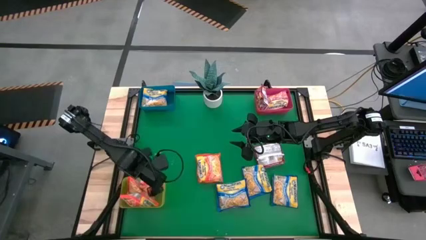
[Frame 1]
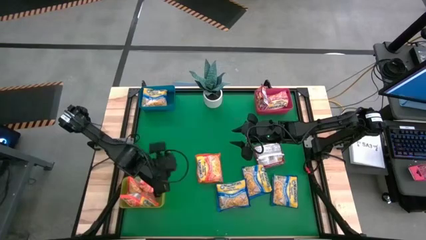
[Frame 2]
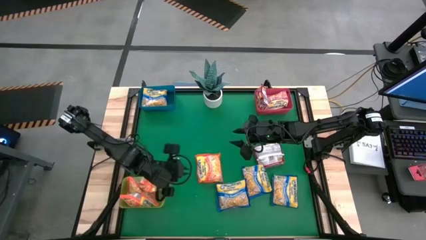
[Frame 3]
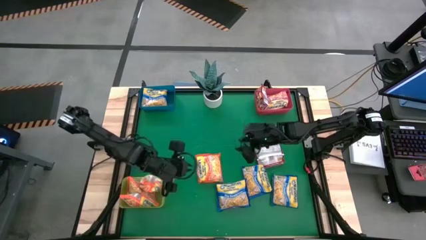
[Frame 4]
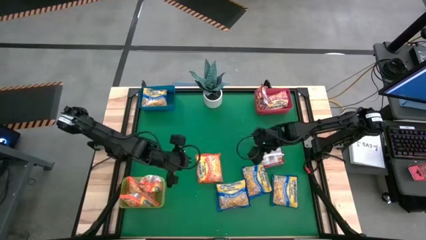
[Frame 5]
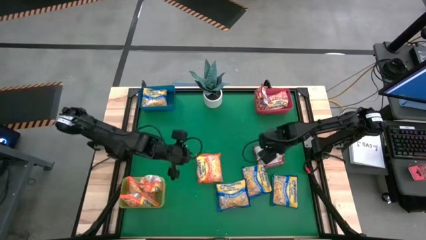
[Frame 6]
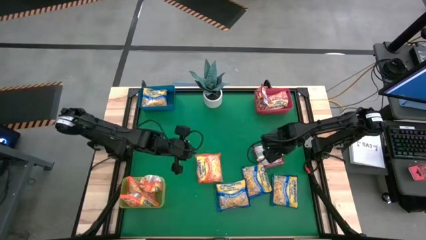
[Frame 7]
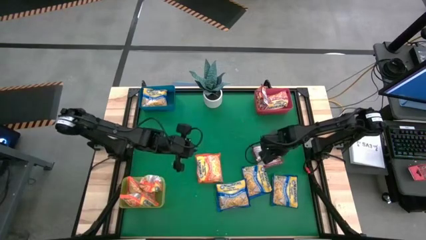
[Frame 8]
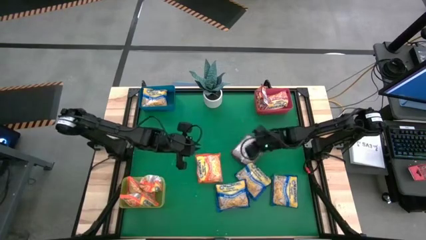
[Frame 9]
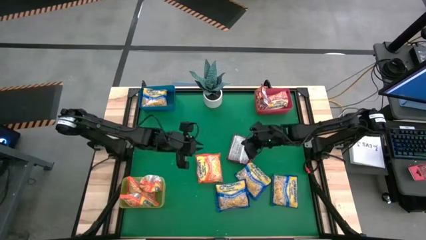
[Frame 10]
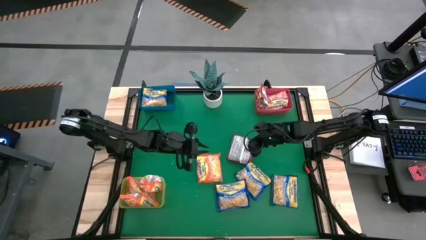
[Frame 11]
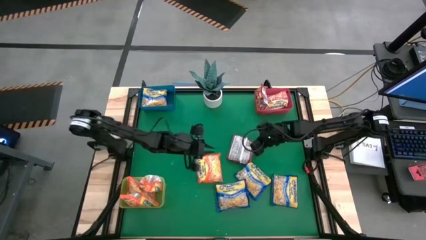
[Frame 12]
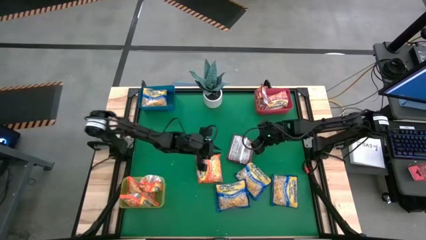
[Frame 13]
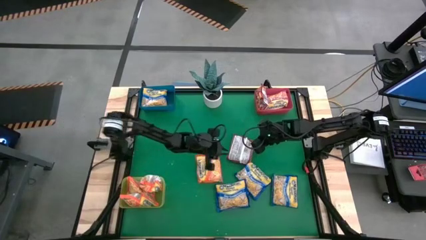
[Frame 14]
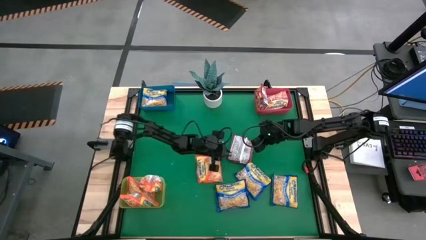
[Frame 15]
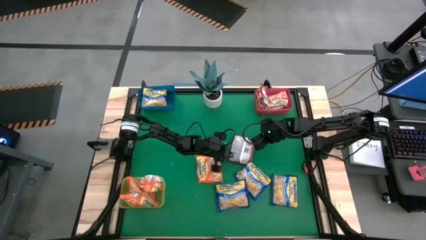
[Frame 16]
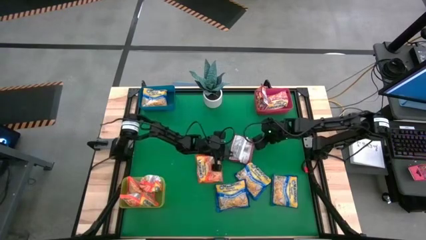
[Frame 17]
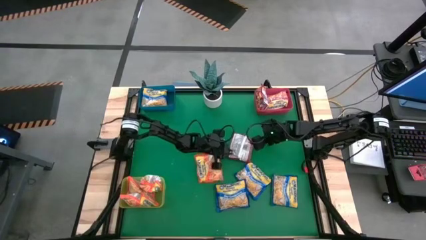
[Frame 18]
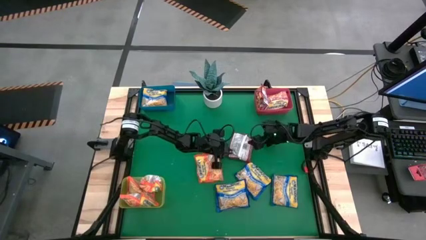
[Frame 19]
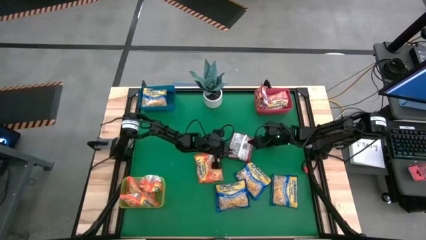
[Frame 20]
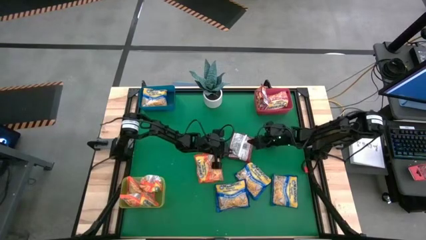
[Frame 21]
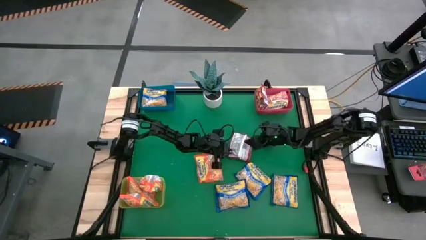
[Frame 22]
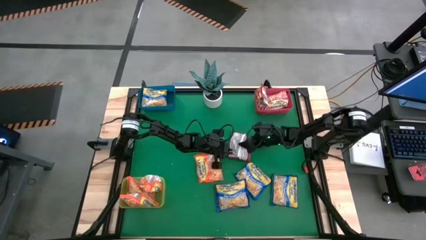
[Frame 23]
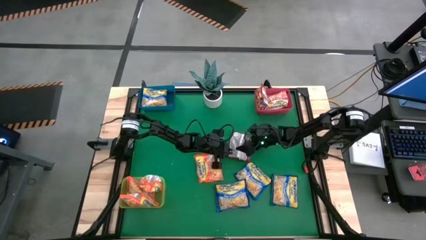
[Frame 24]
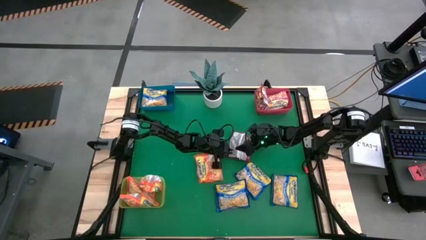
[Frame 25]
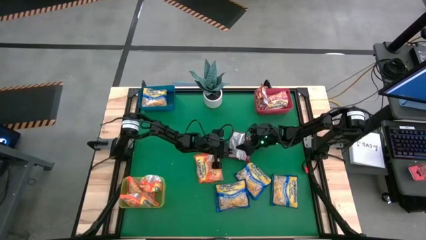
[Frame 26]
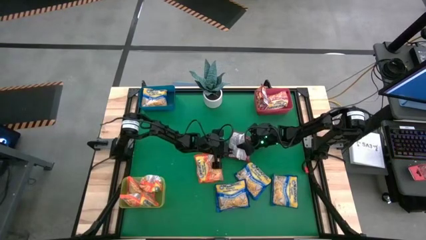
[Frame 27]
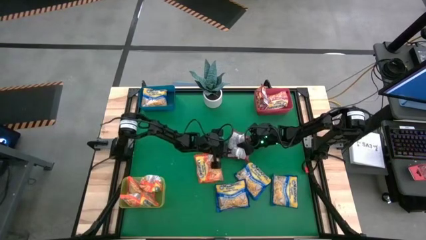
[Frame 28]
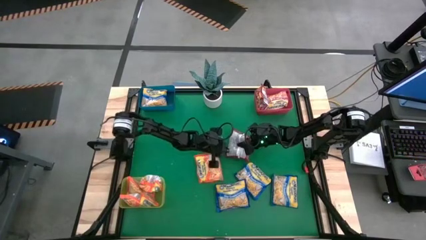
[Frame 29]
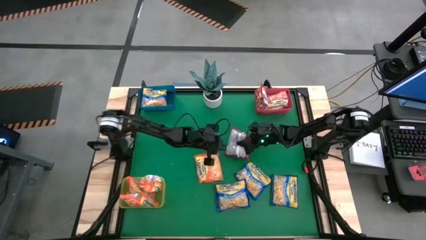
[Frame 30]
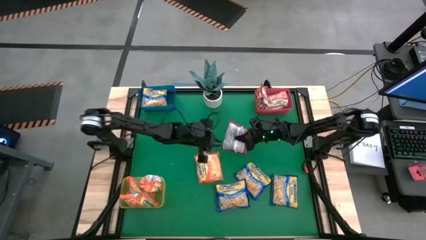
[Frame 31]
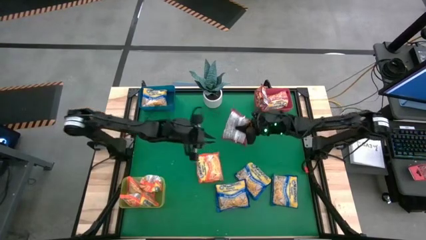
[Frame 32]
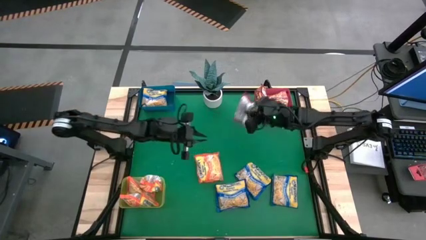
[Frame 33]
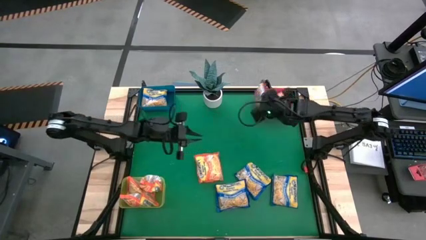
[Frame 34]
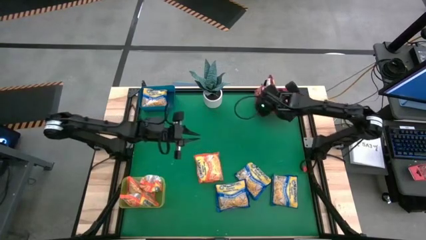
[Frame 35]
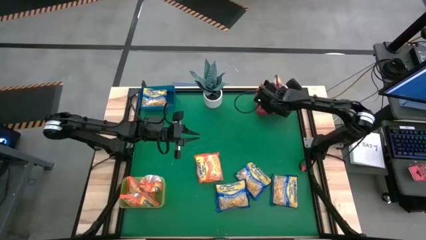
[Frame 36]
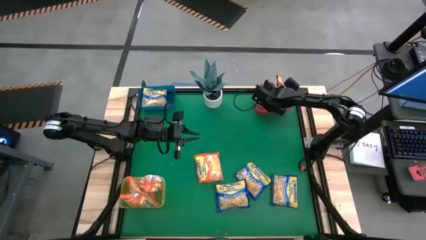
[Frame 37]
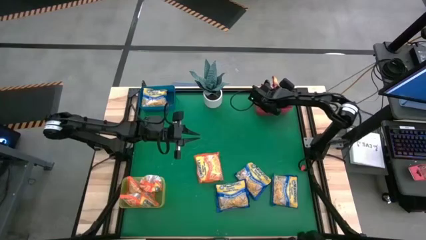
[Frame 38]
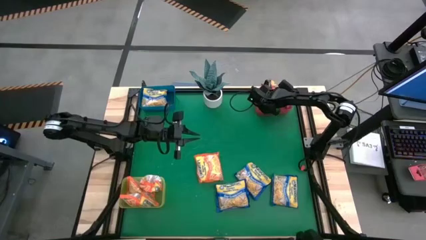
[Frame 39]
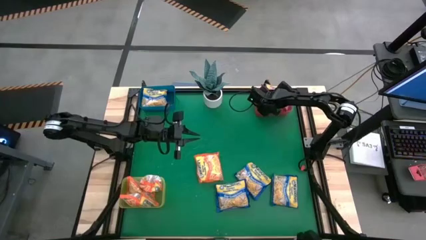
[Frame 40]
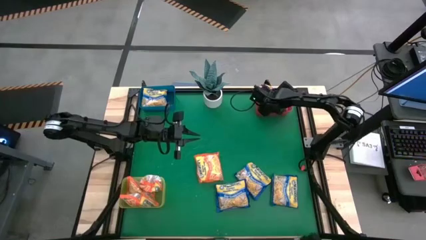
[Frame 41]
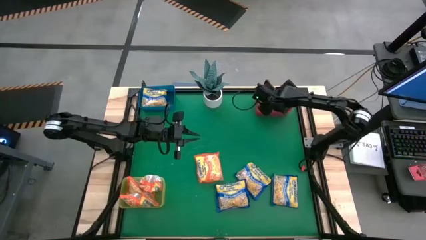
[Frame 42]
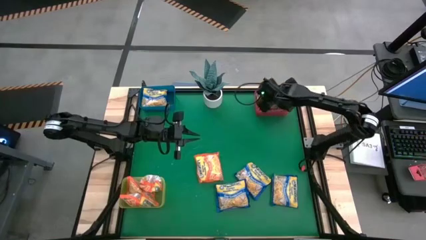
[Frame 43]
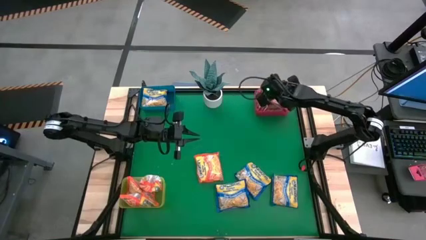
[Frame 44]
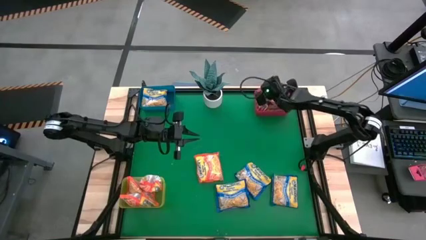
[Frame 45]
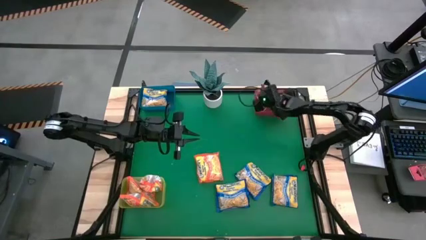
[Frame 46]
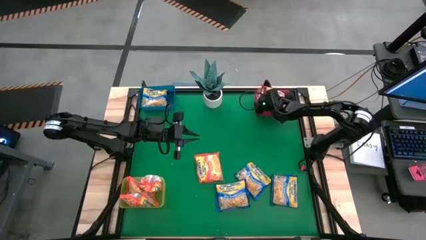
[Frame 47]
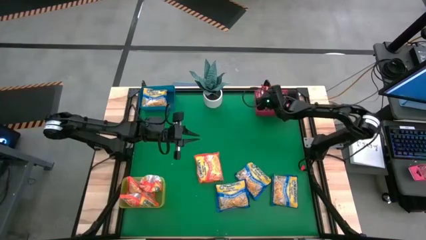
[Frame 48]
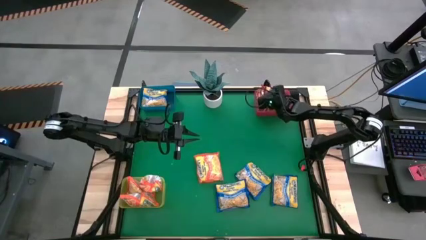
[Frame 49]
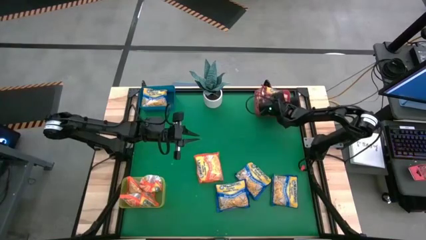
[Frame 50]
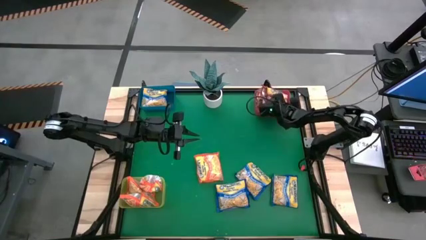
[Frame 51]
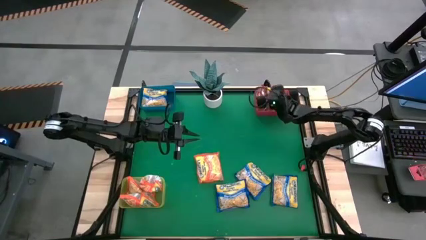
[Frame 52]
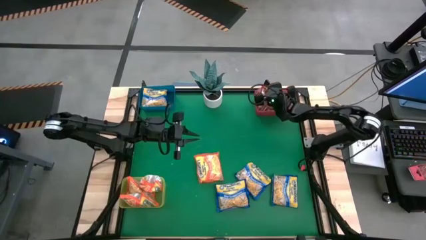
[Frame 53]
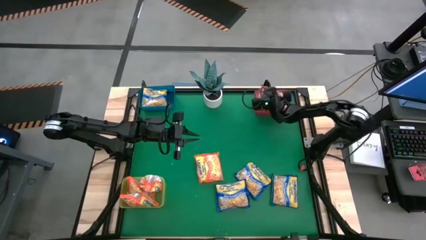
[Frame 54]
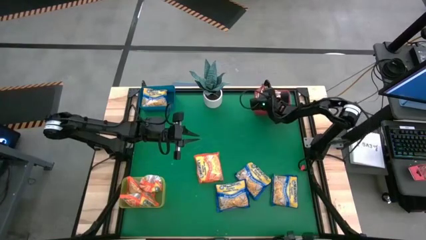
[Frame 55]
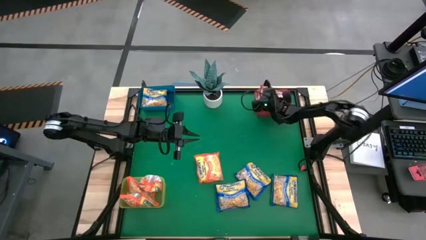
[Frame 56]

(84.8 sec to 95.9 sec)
Task: Sort Maruchan noodles
Put the red noodle pack into the pink bin
